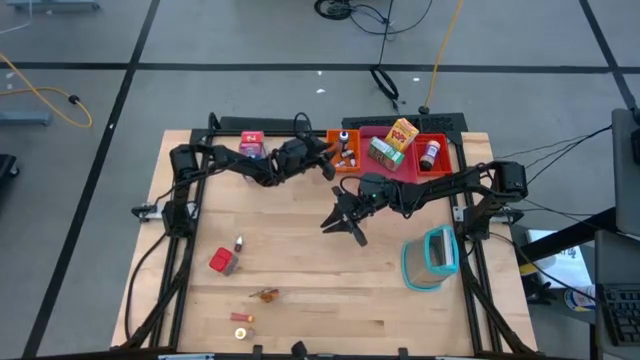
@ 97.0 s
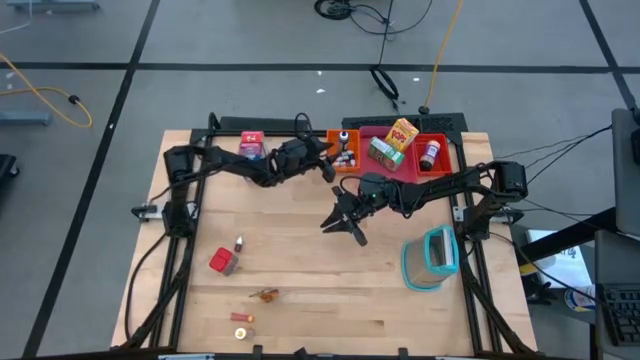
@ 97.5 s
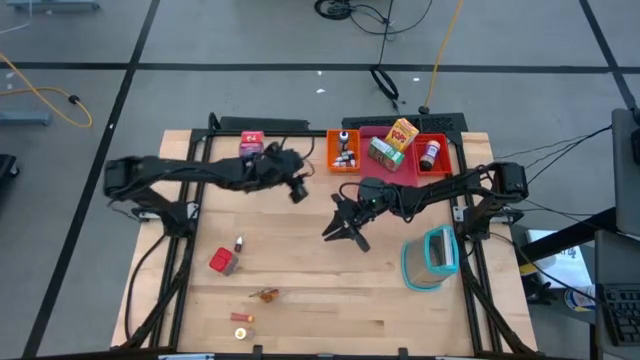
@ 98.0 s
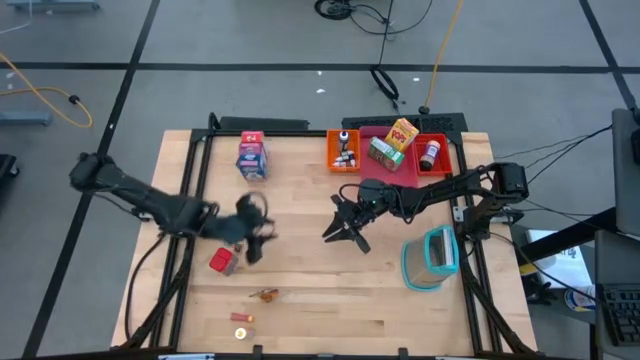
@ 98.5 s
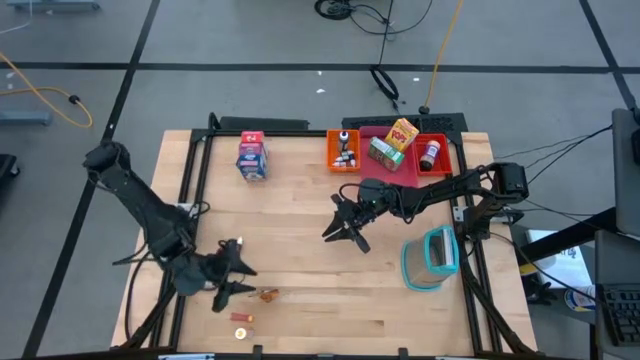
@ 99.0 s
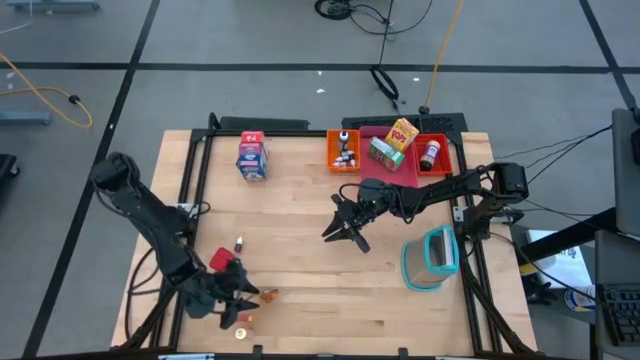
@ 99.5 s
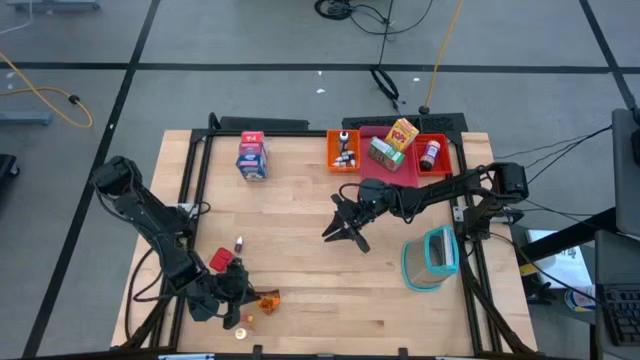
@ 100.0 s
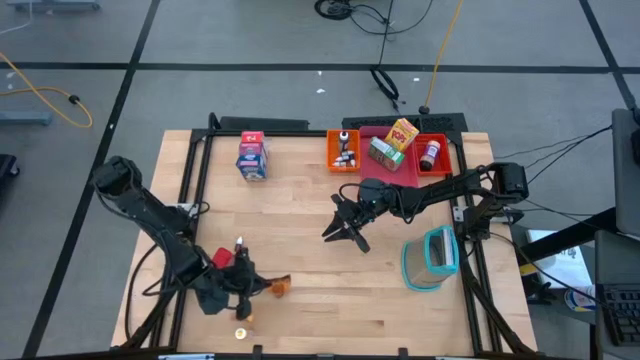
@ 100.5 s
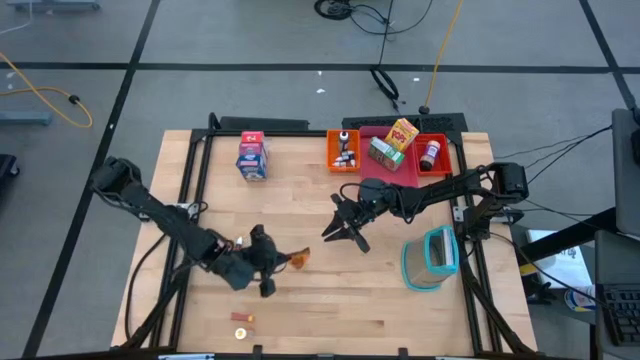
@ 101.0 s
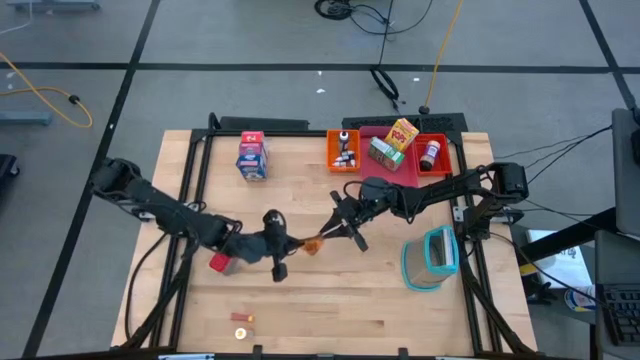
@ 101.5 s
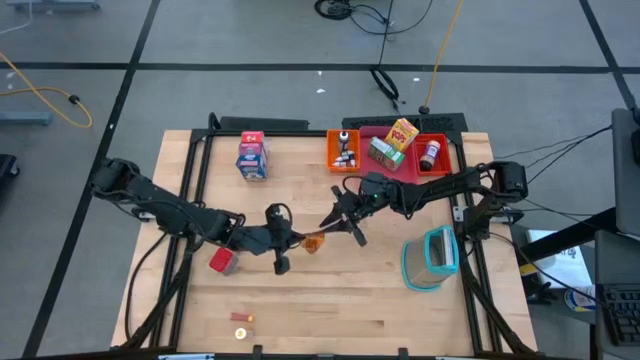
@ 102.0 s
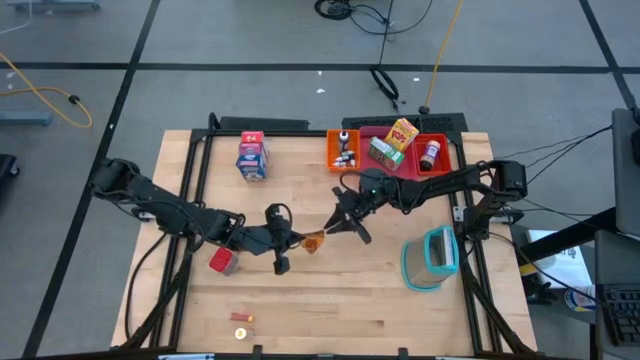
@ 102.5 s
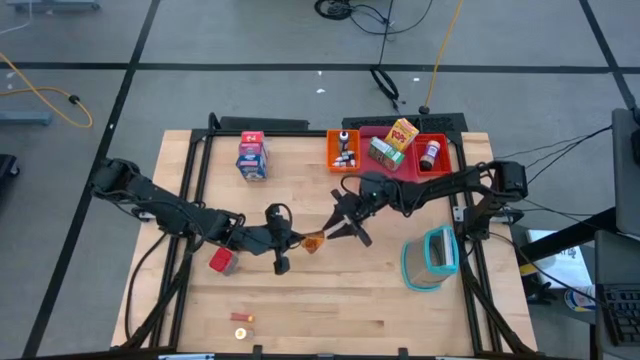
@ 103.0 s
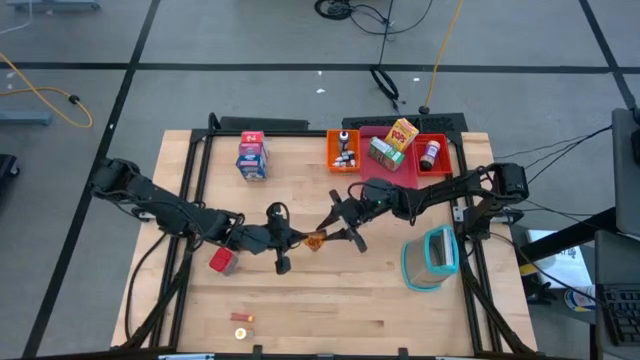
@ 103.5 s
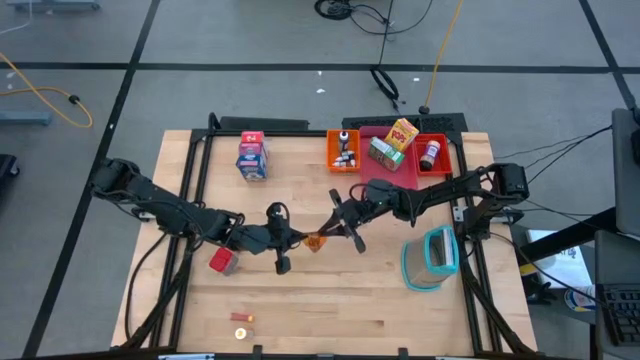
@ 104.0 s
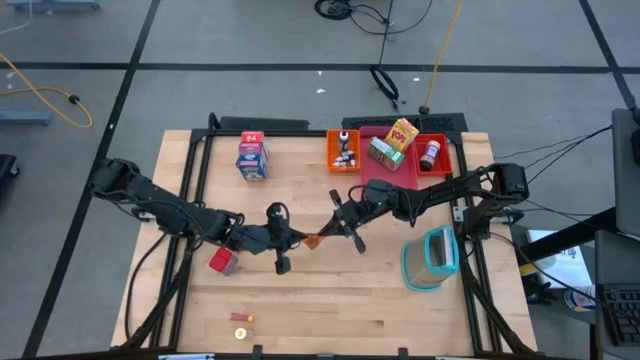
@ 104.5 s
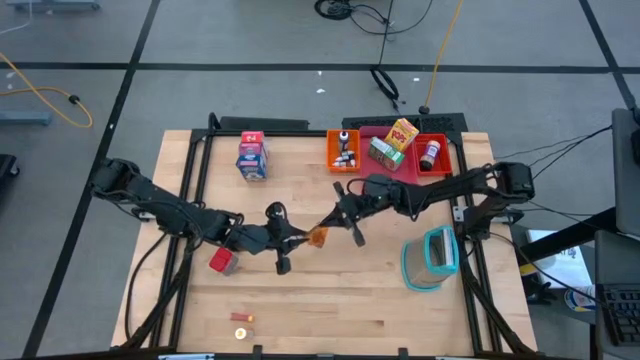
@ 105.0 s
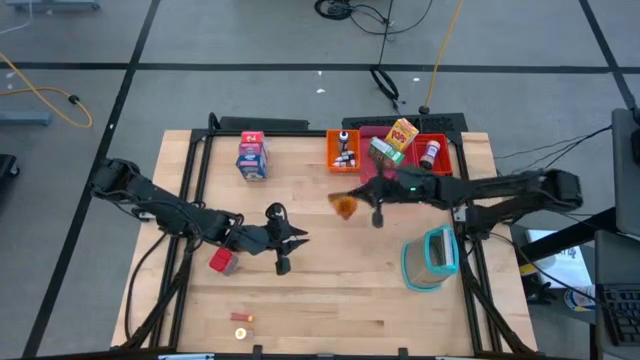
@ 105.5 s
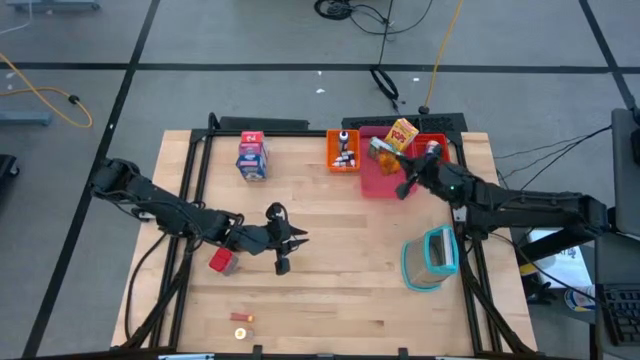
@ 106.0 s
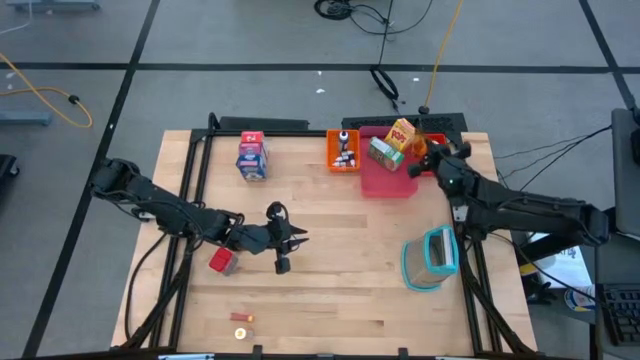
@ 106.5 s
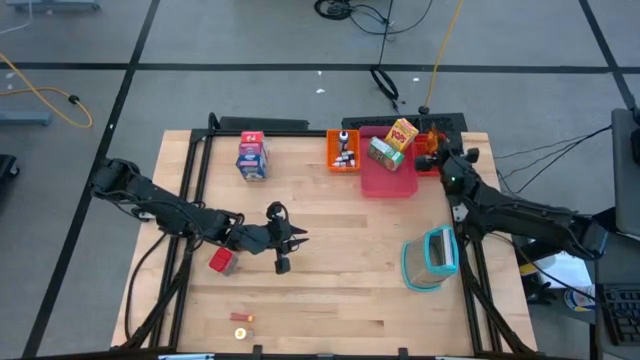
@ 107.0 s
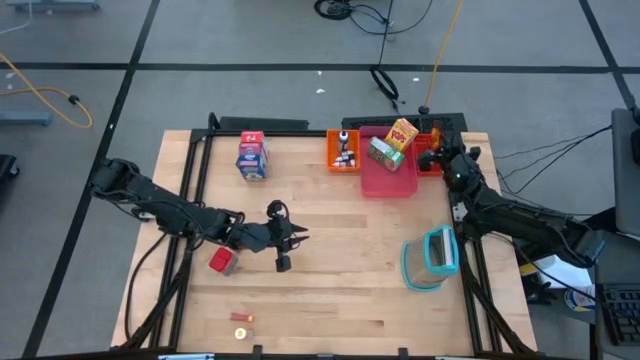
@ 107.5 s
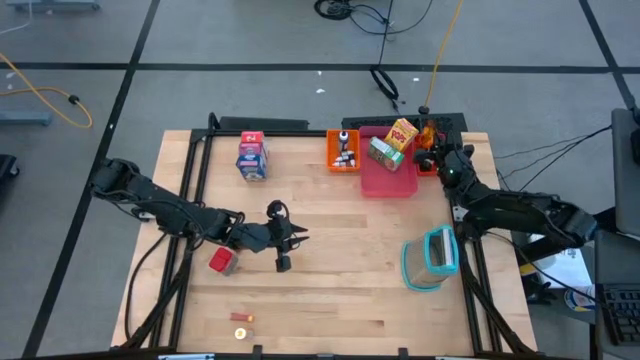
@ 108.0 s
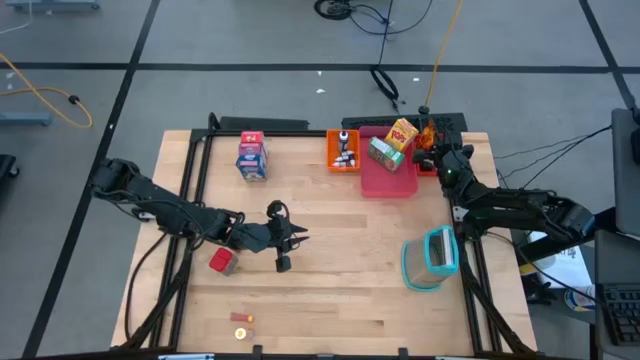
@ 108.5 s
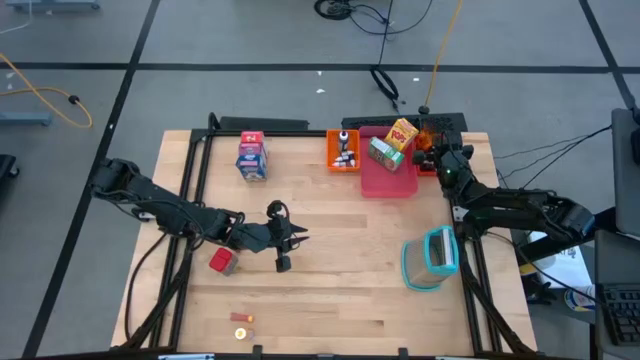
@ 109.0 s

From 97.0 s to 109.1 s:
Task: Pick & Place Kitchen Items
Put the orange seasoning pack into the red bin

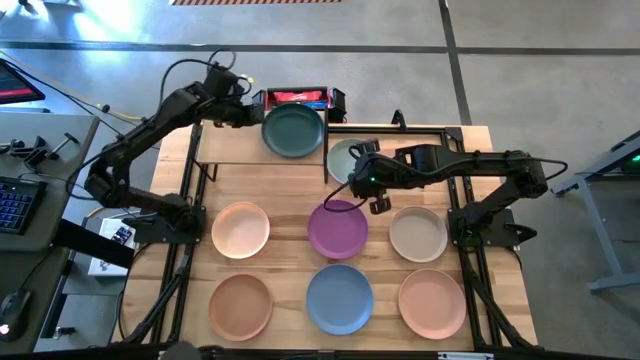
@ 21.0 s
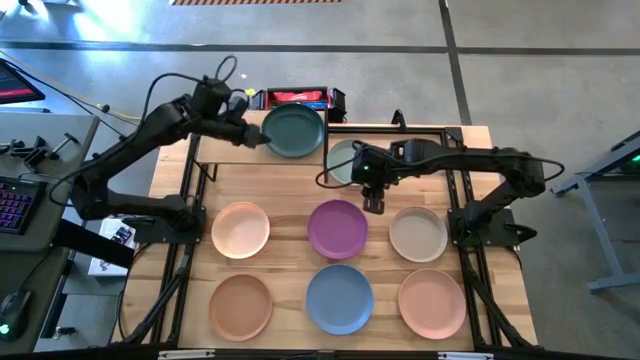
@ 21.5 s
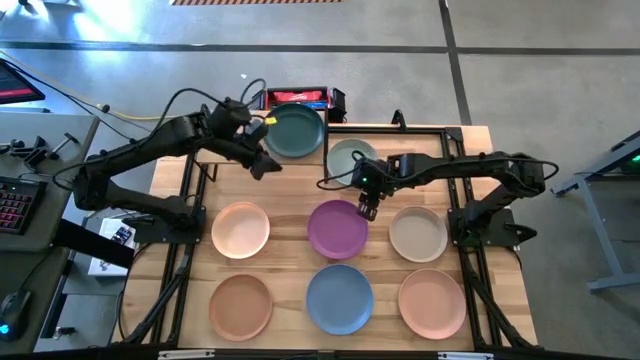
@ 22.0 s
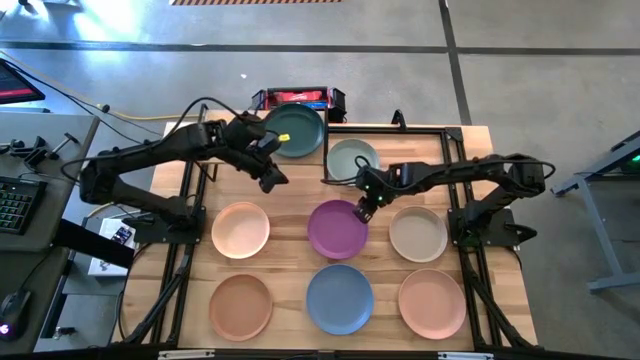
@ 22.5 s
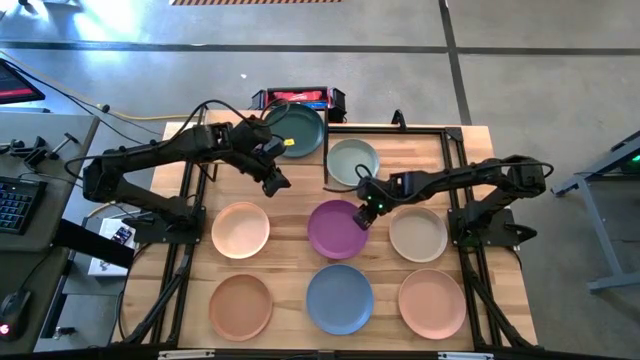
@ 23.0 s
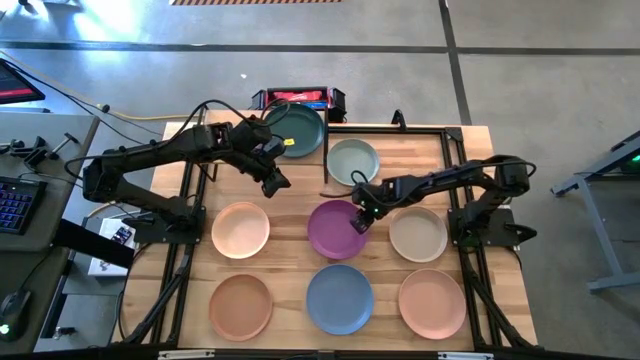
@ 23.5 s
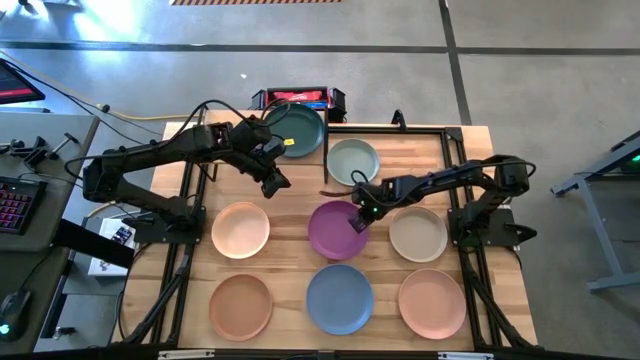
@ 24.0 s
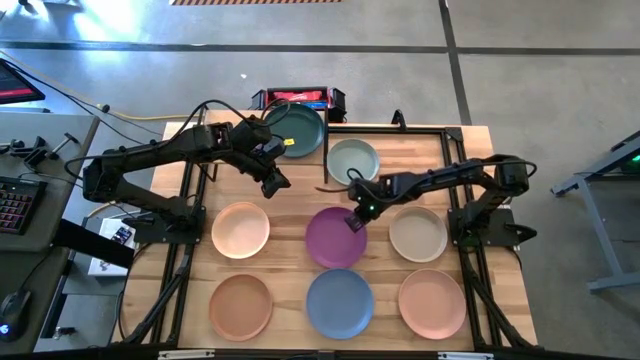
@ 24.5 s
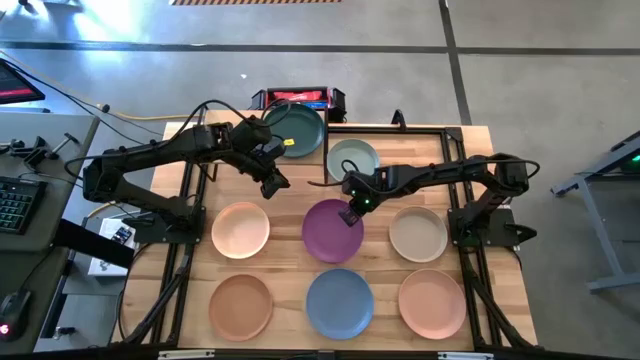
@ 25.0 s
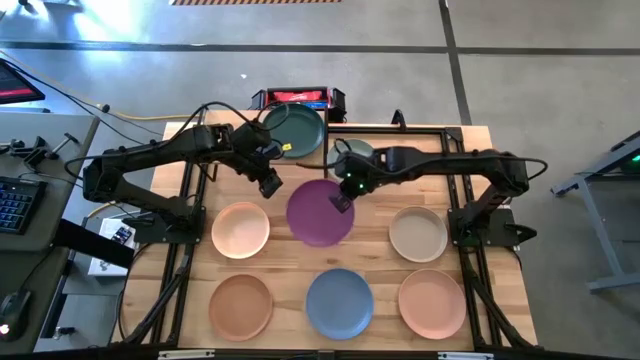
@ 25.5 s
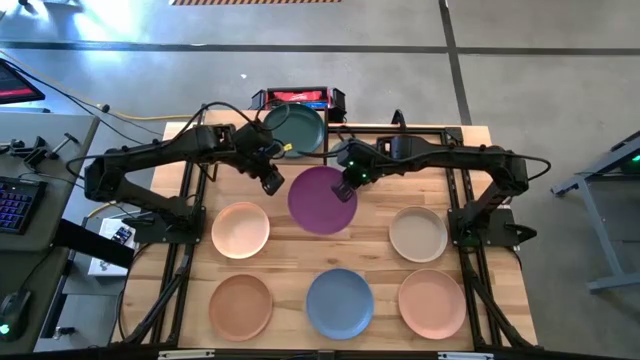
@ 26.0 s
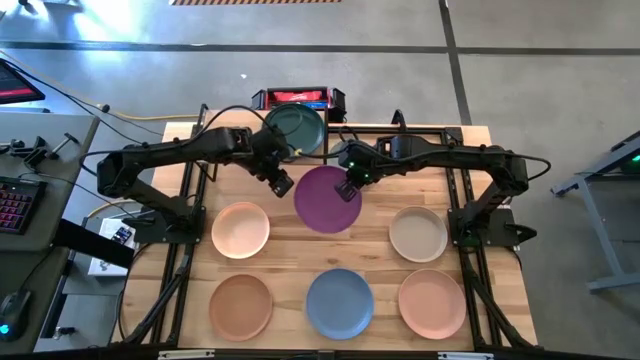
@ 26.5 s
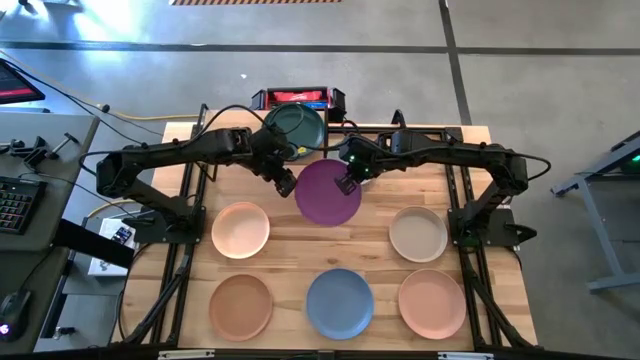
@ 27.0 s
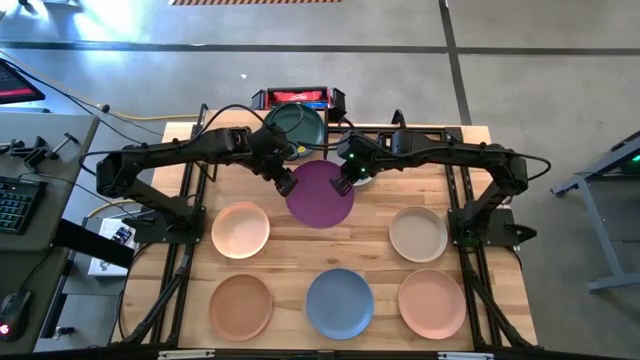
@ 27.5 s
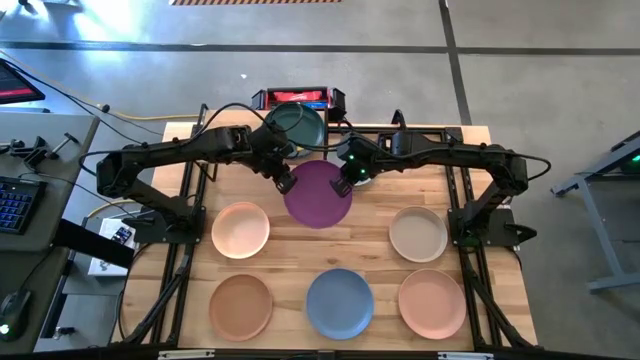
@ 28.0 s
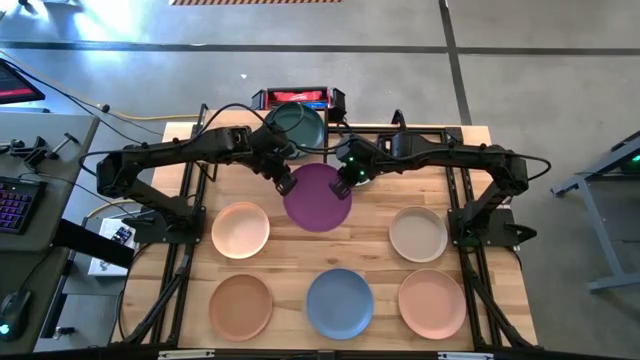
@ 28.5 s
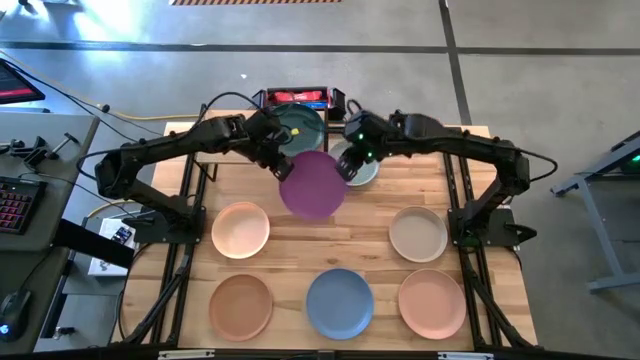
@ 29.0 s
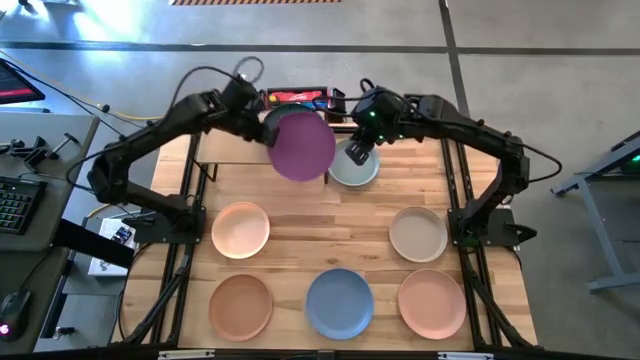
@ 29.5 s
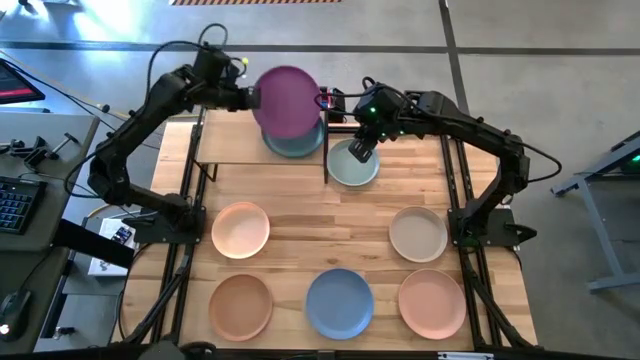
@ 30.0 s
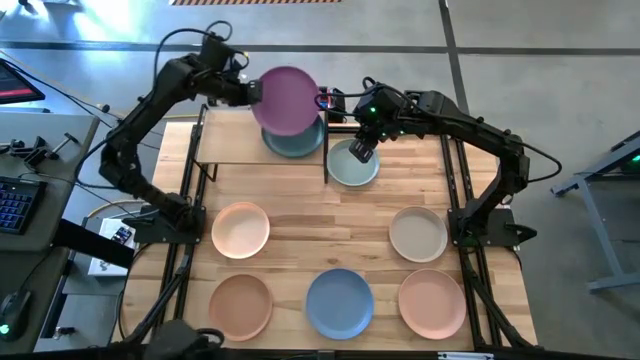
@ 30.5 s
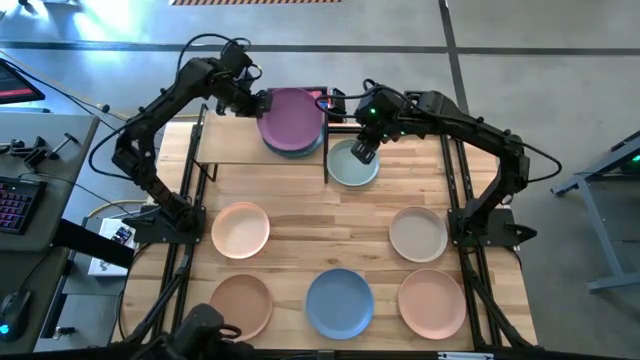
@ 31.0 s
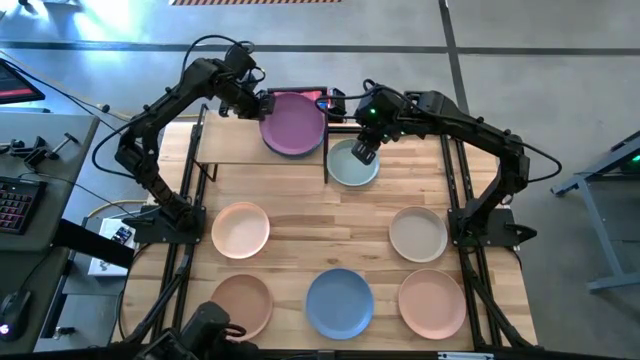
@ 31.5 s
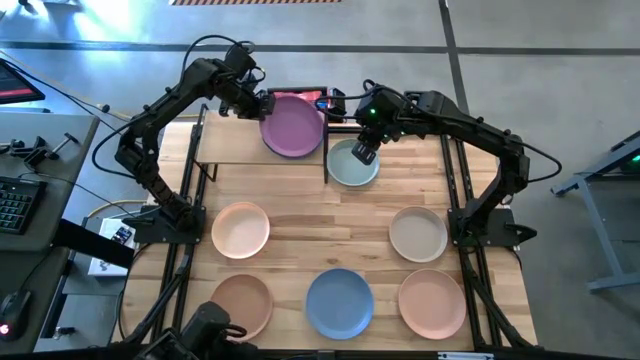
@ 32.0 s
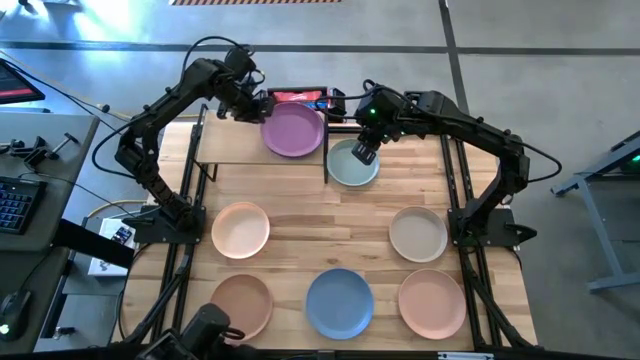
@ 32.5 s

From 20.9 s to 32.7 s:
Task: Place and stack plates onto a shelf
Stack the violet plate on top of the dark blue plate on the shelf
